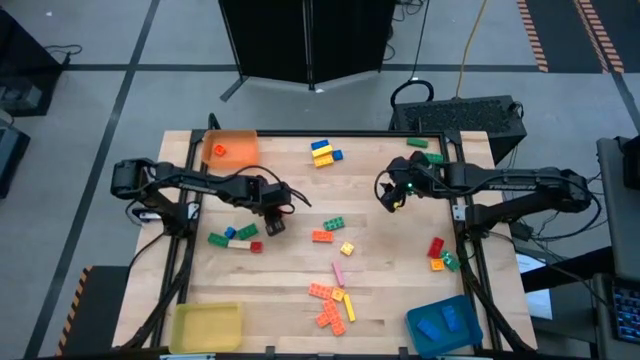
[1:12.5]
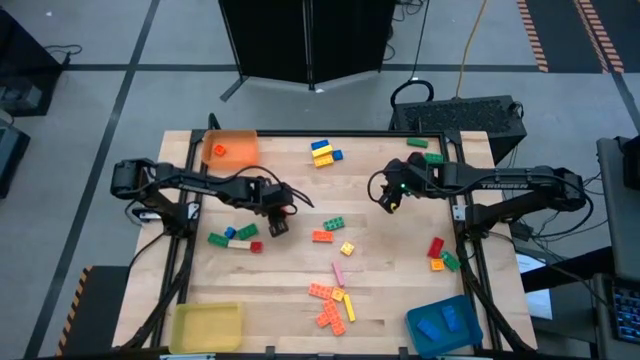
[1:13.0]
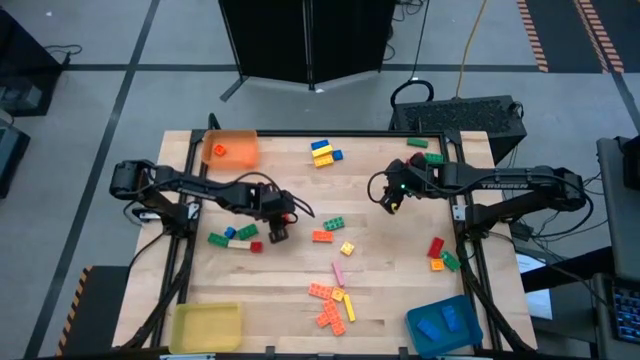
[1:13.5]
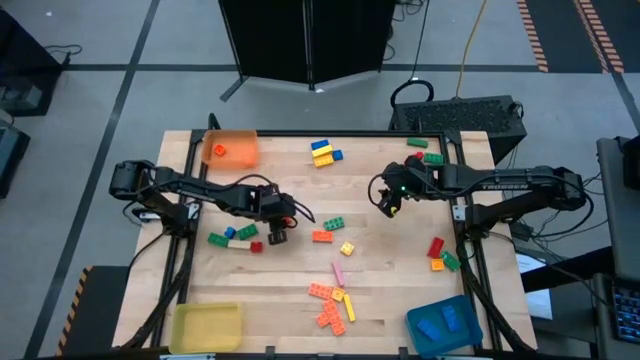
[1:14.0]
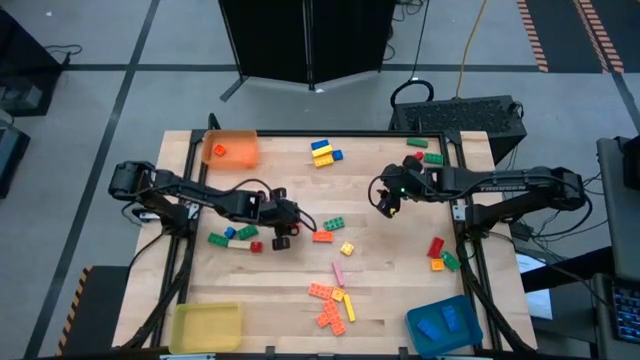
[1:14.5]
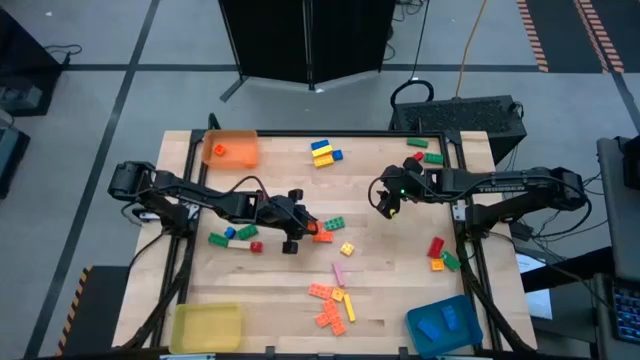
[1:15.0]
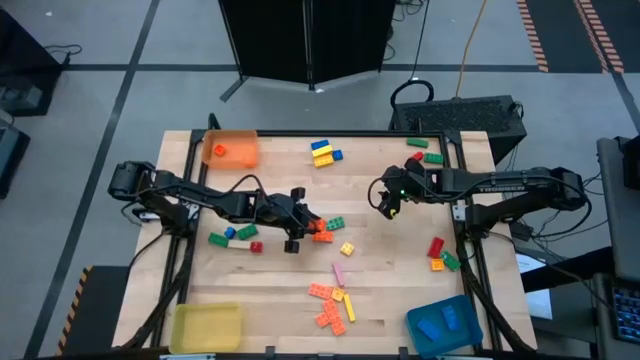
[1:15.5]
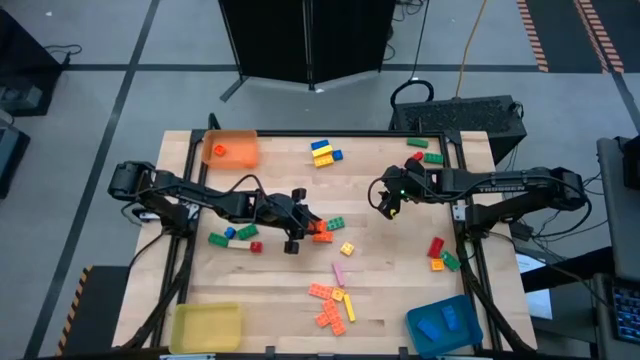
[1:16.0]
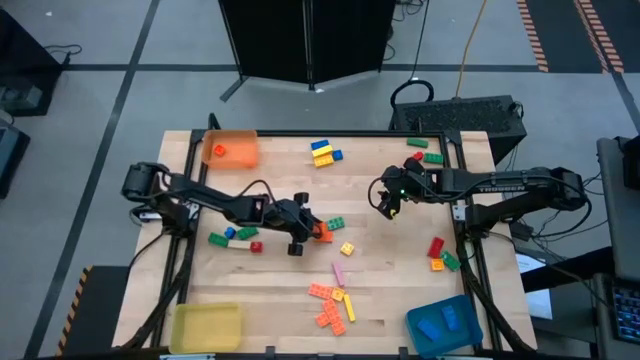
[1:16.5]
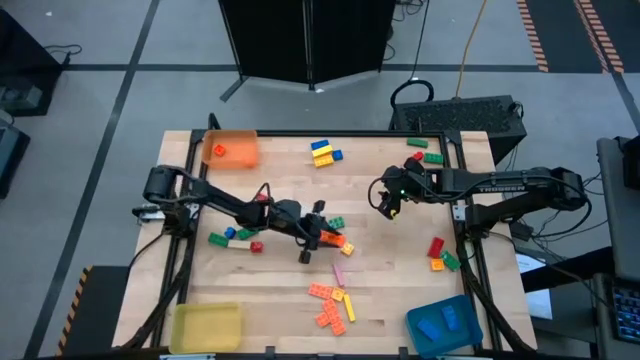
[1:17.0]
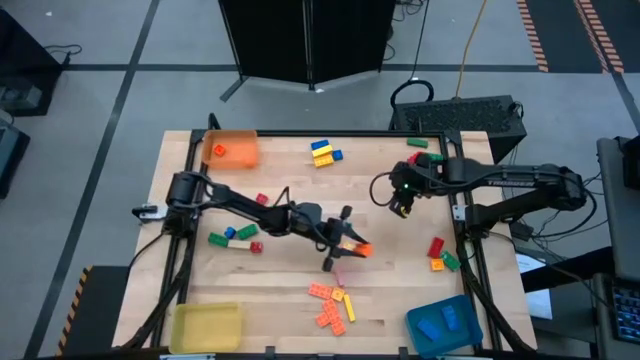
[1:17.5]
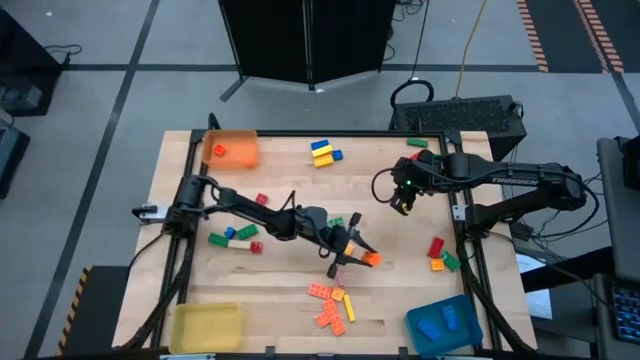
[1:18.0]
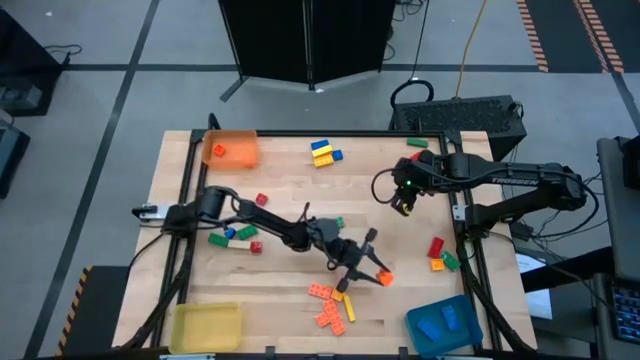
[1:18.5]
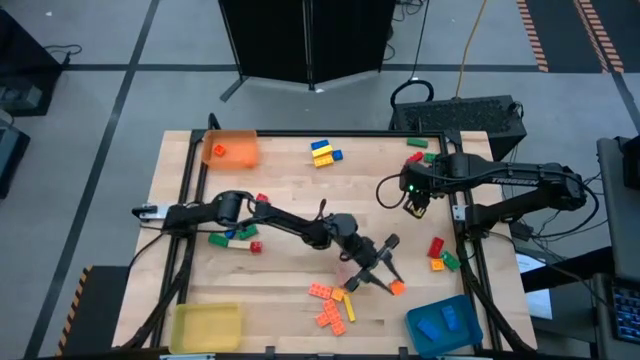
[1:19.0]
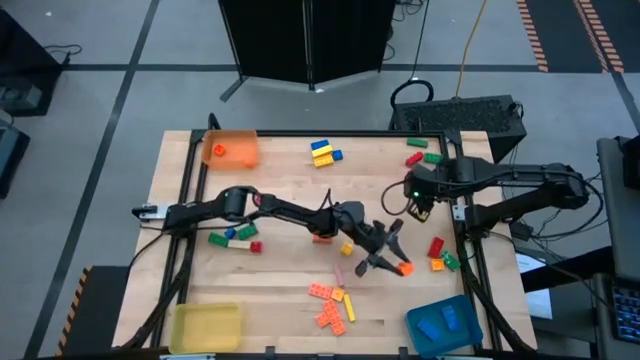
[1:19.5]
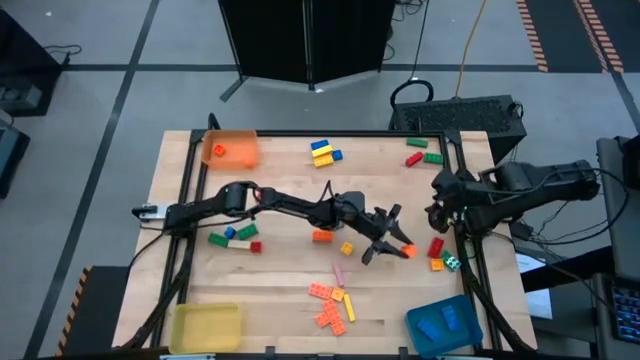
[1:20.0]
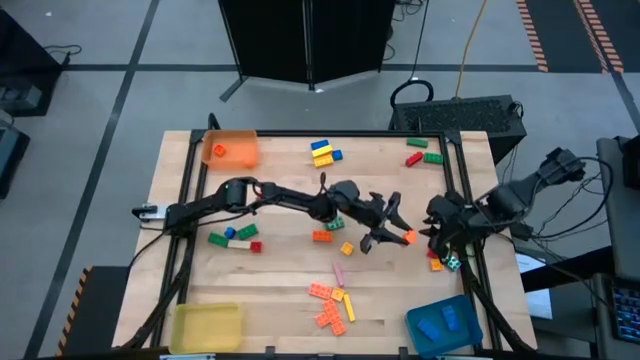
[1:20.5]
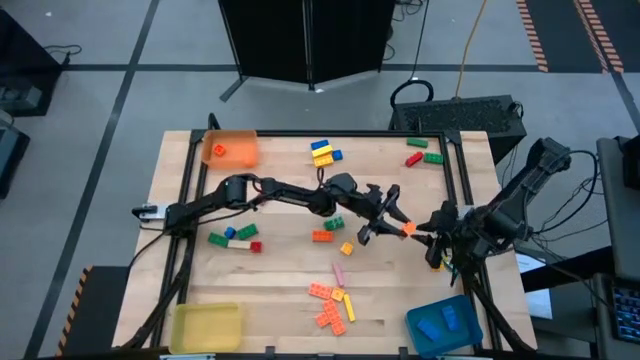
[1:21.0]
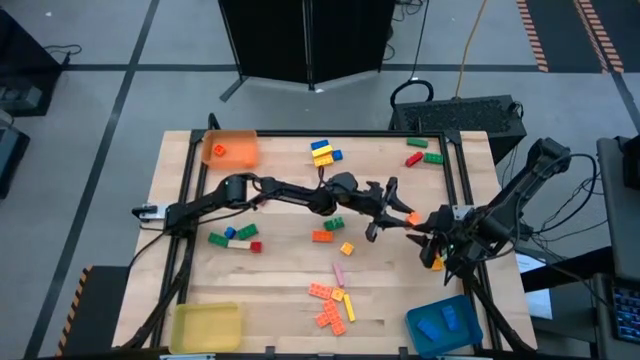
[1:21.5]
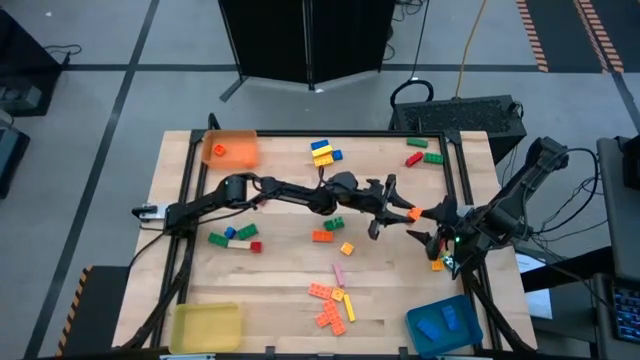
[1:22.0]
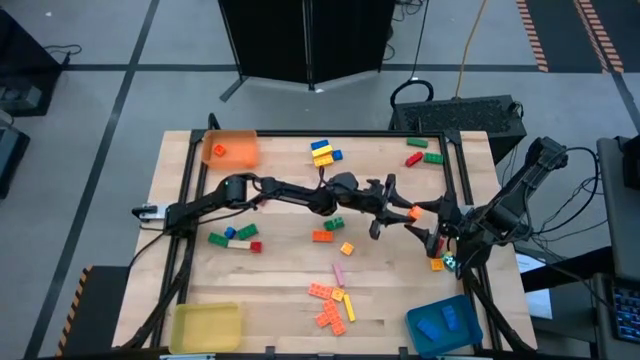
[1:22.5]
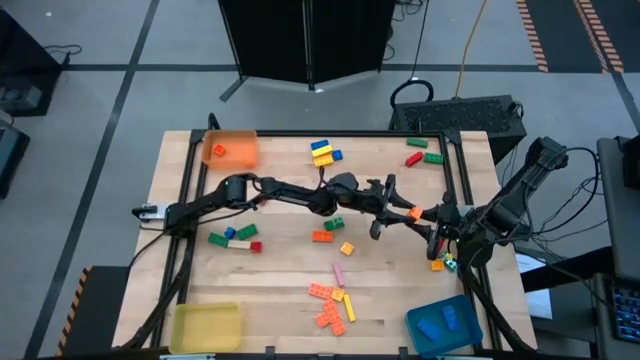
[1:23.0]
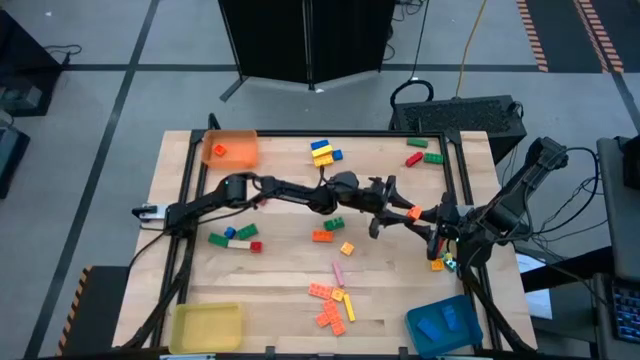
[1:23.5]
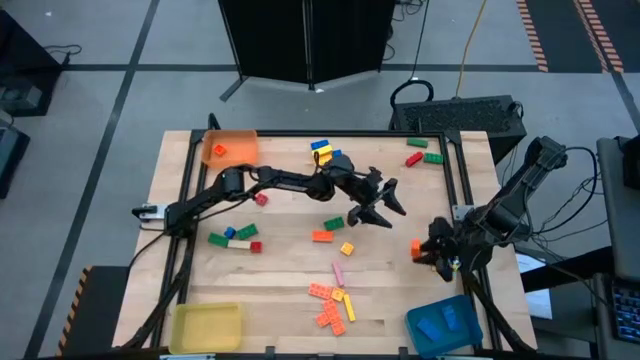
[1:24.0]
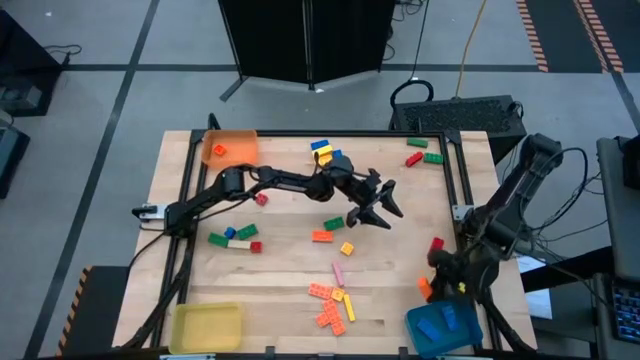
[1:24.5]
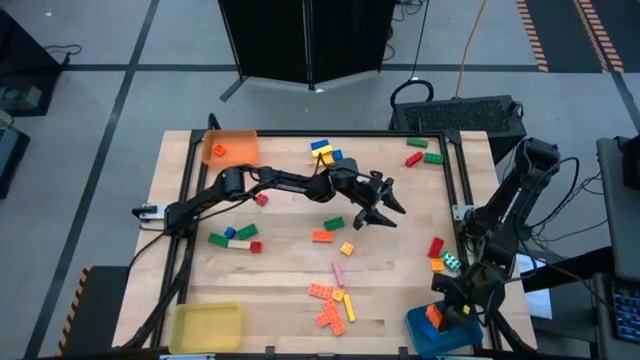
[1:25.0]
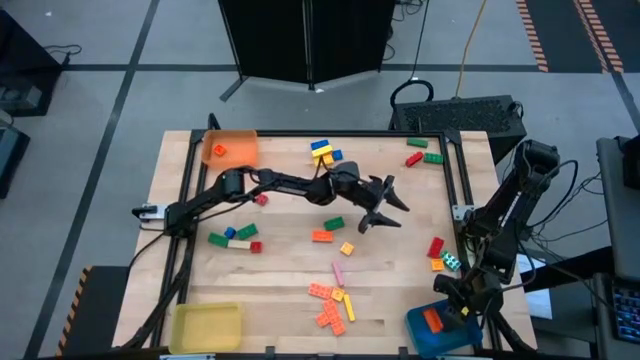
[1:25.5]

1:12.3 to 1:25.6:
Task: Sort blocks by size
Put the orange 8 stud game piece into the blue bin

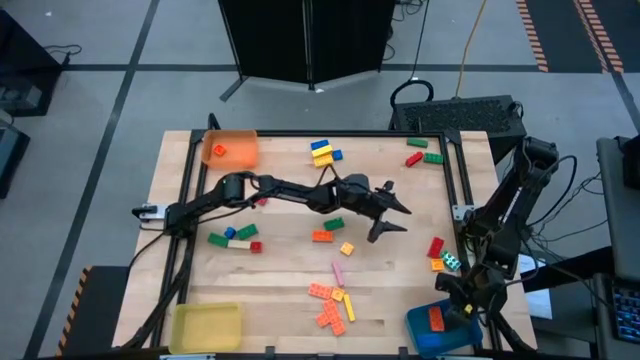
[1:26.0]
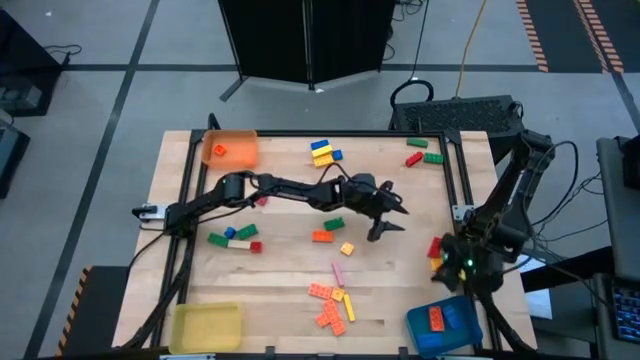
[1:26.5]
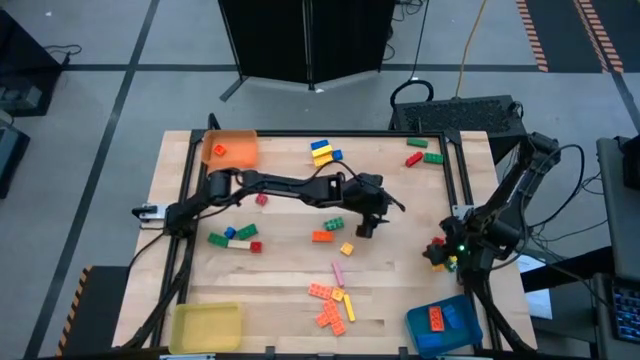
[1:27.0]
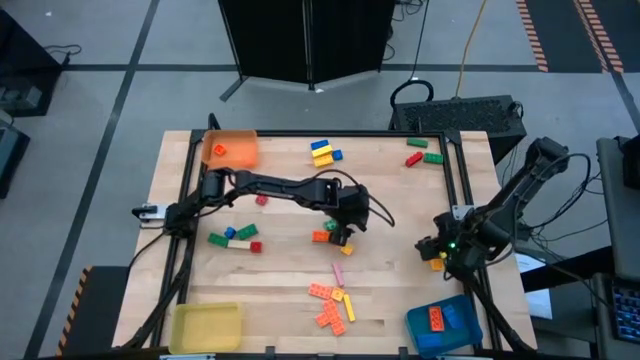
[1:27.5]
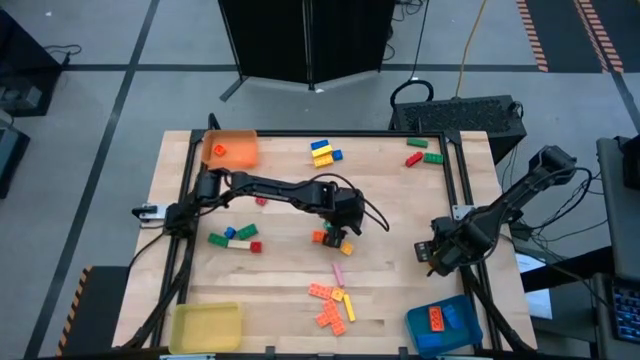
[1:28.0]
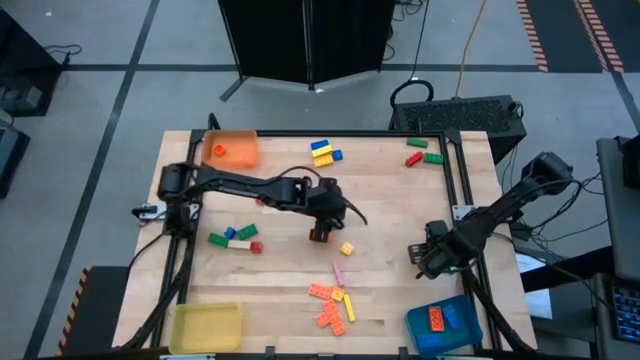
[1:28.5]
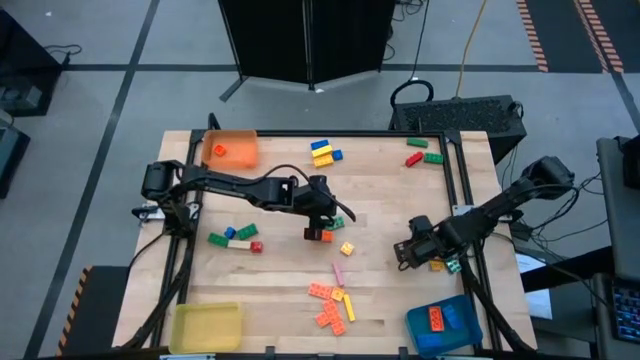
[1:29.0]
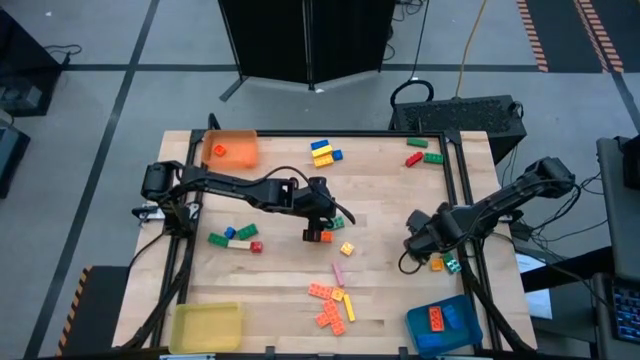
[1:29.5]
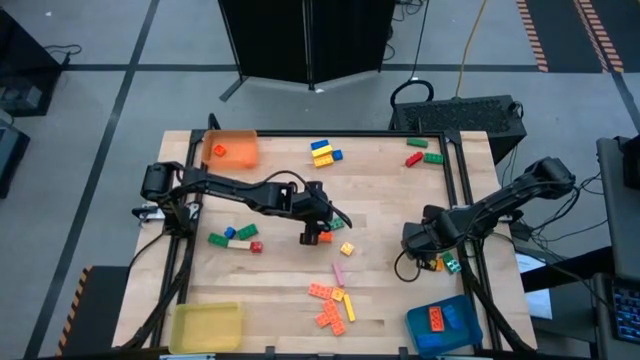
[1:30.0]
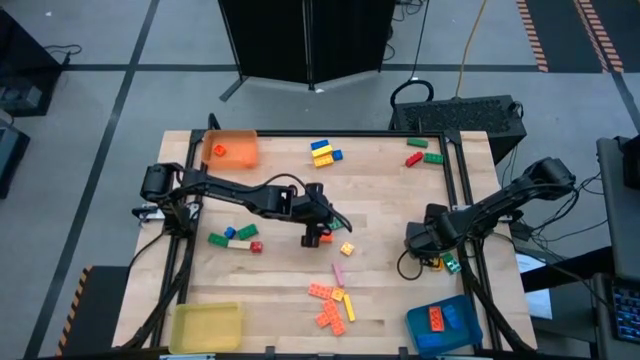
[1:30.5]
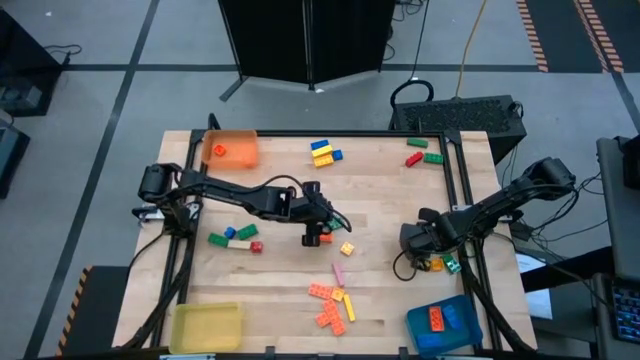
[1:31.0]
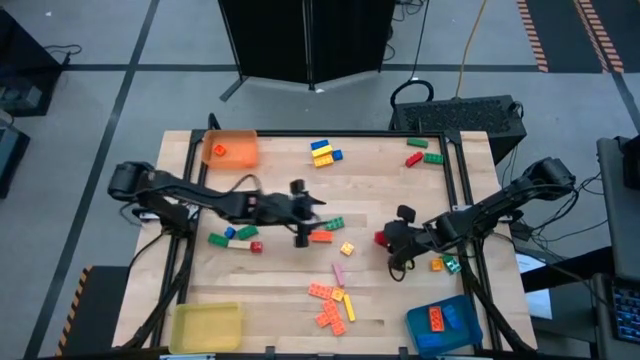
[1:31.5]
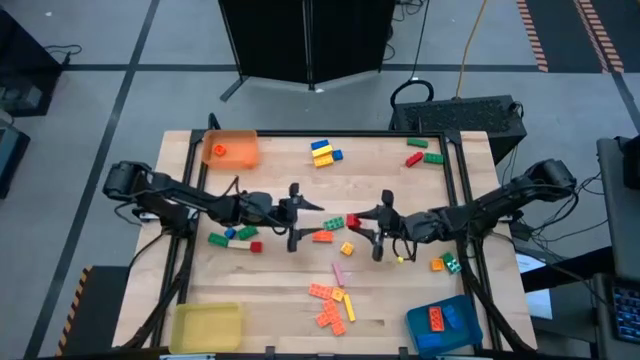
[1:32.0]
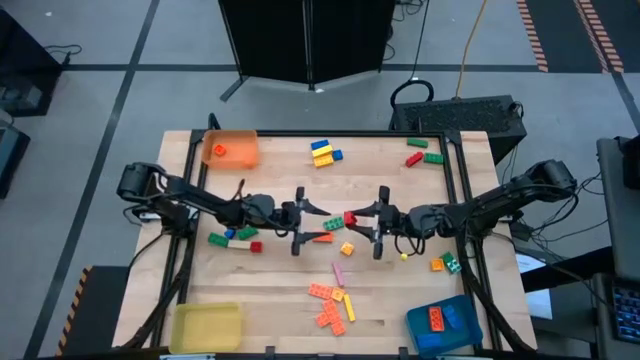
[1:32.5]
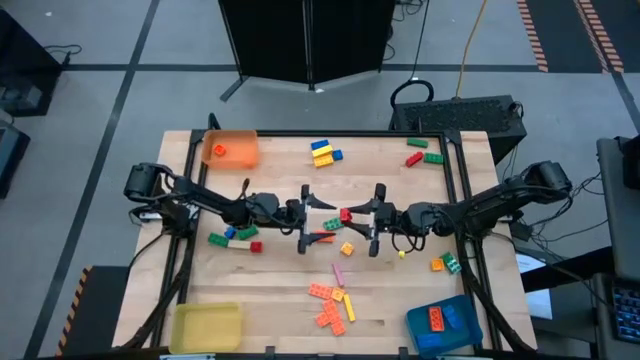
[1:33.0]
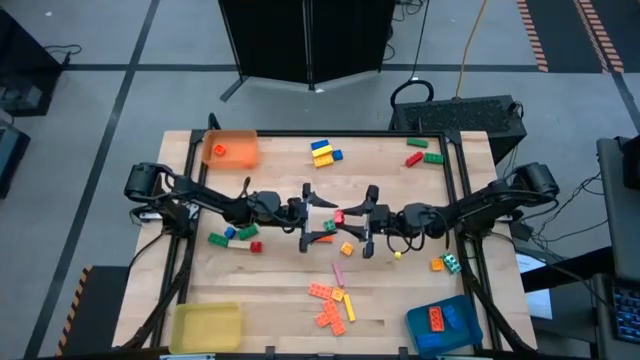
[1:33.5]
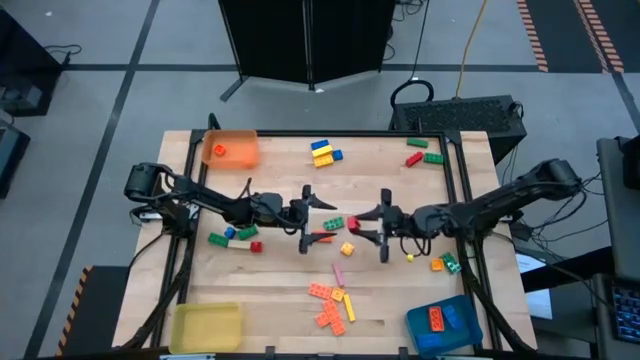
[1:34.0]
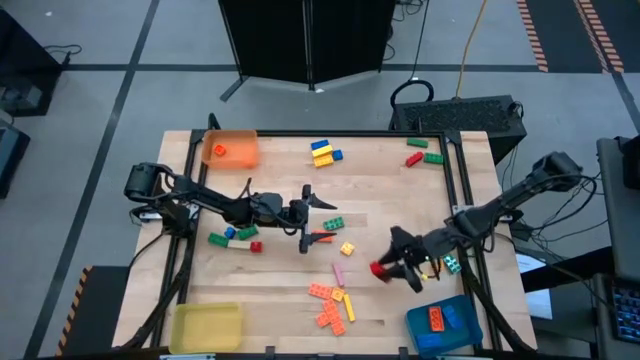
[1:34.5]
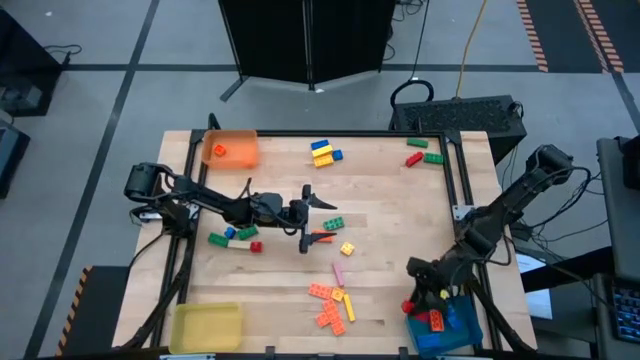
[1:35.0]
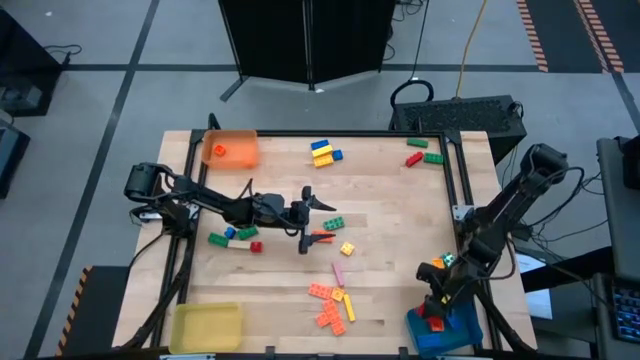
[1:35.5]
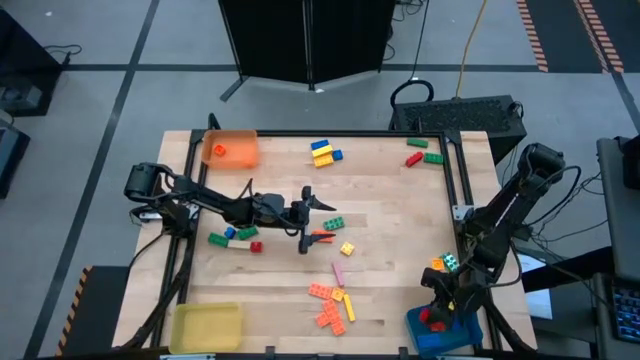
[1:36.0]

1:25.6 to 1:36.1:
Put the red 8 stud game piece into the blue bin
